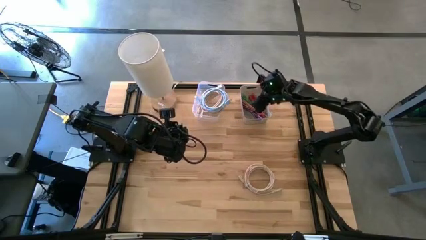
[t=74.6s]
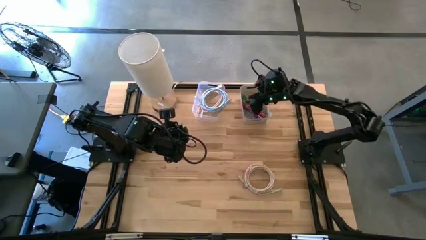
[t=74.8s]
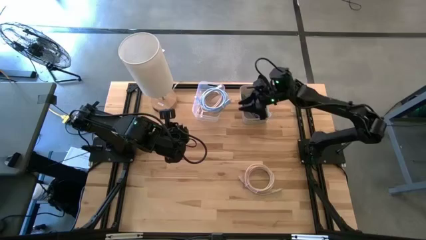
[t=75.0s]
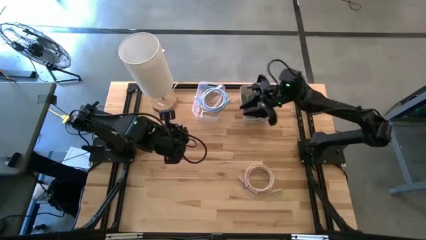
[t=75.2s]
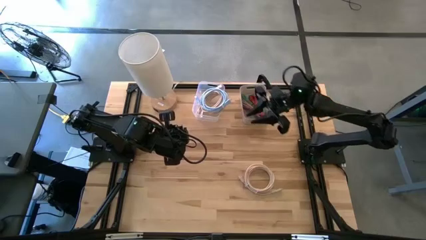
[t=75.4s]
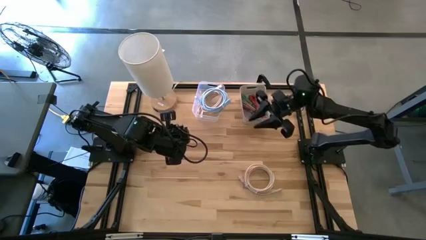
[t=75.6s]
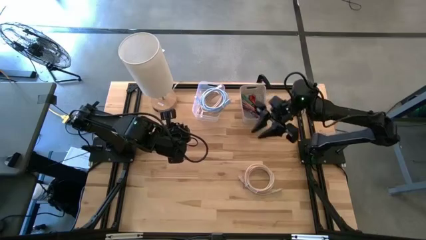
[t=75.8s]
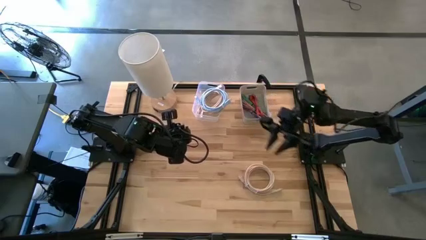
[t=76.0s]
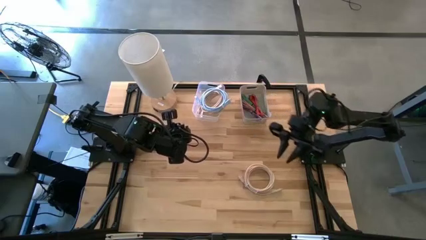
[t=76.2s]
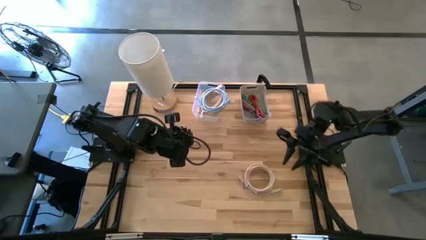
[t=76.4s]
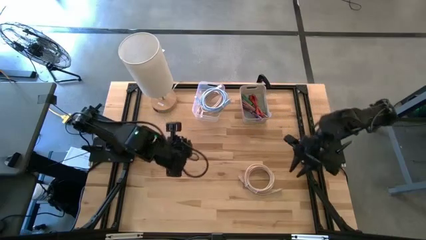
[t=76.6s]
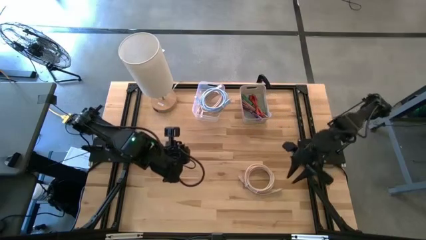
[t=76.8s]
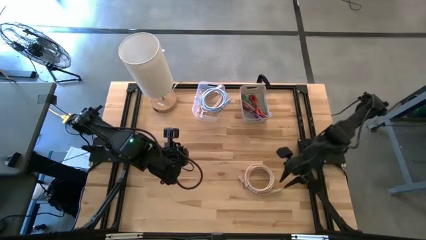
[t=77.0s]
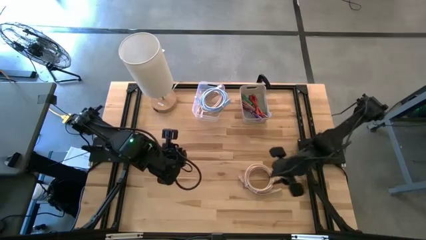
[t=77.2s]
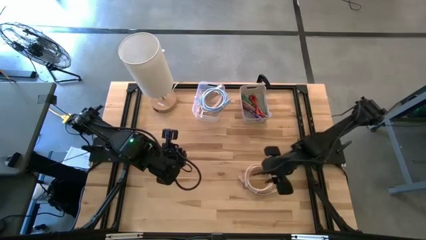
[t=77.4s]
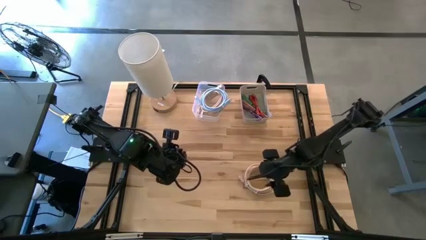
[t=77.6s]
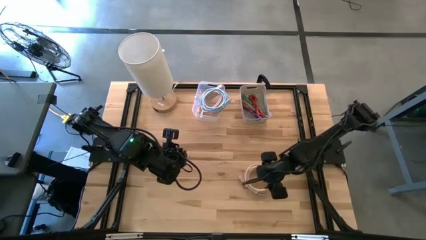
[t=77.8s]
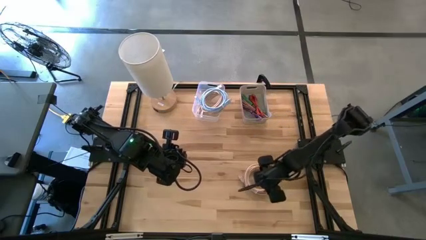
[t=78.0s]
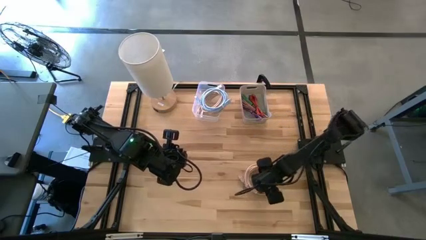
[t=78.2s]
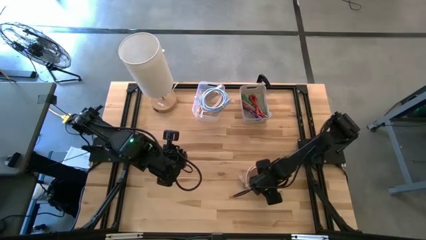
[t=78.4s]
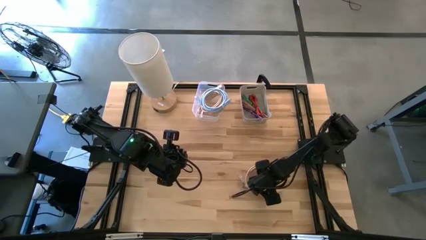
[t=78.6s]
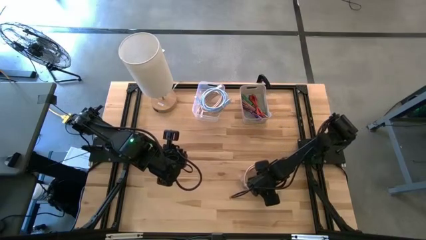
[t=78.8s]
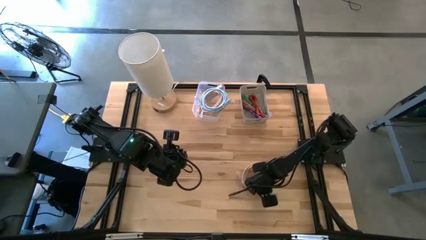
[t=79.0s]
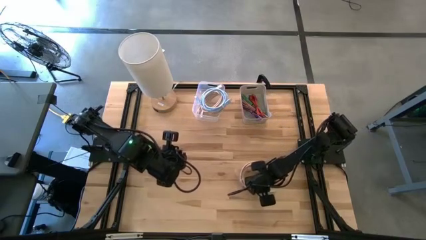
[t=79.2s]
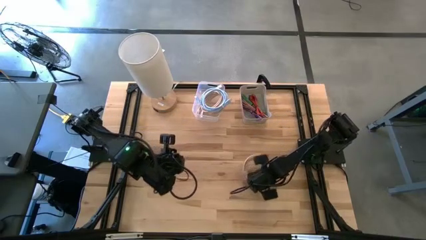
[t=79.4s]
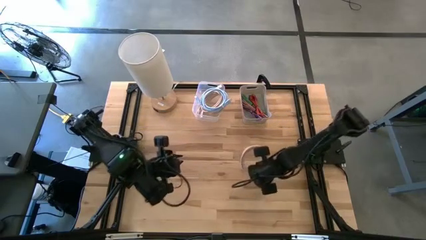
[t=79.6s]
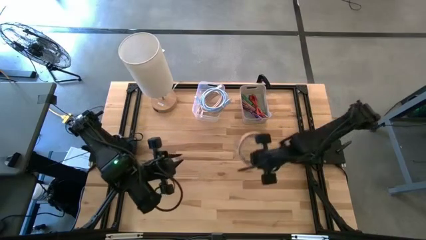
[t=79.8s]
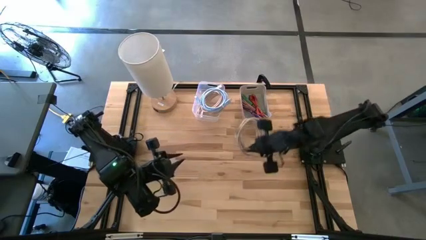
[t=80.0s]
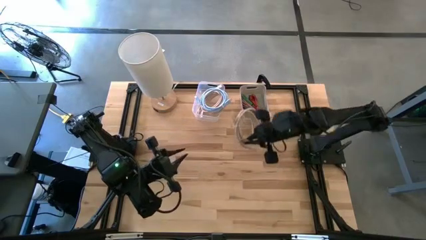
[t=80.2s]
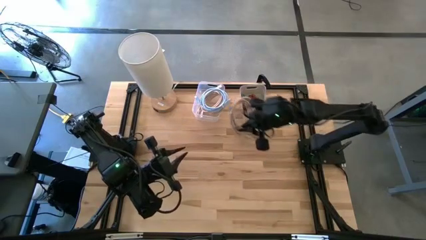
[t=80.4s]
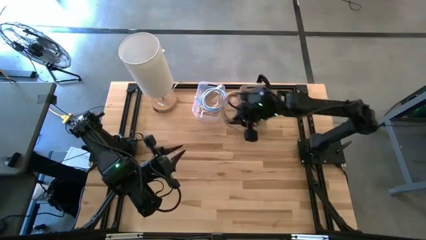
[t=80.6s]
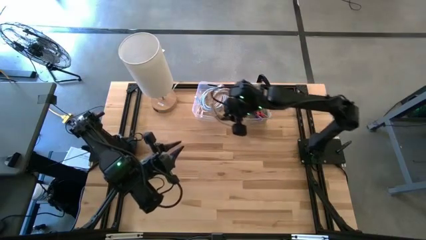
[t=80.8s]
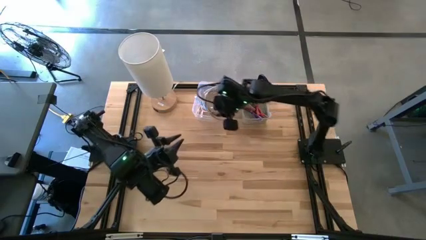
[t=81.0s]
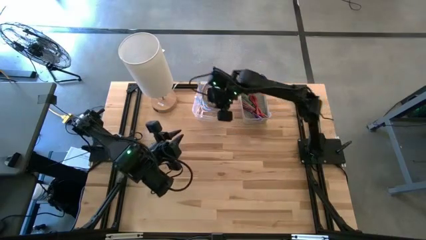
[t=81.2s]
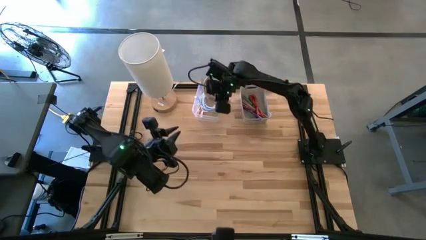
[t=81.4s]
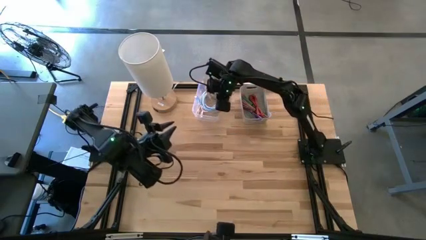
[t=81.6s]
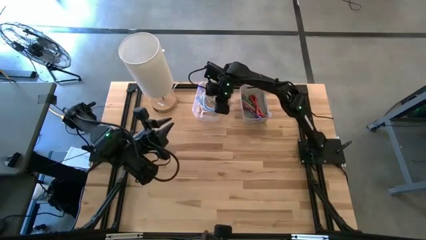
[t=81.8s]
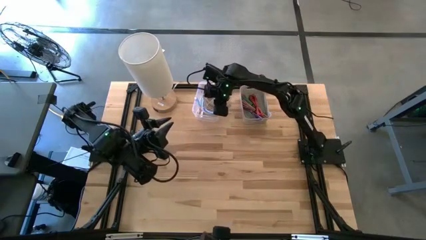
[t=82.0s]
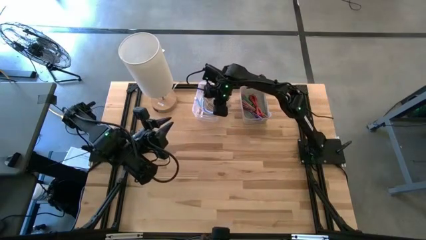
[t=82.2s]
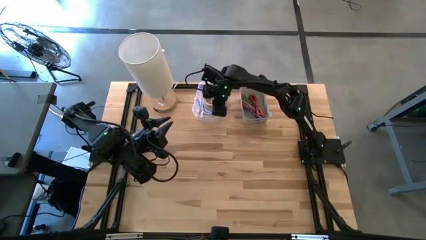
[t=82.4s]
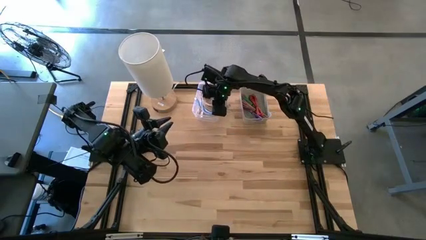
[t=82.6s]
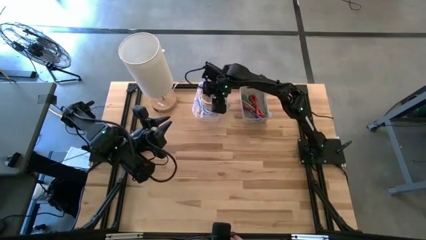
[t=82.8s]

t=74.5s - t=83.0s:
Task: Pick & Place USB Port
Put the light yellow hdmi cable into the transparent bin

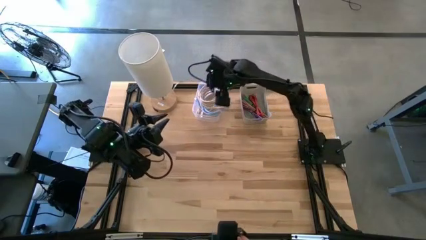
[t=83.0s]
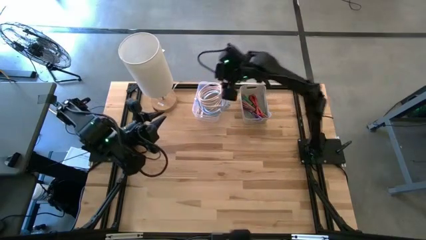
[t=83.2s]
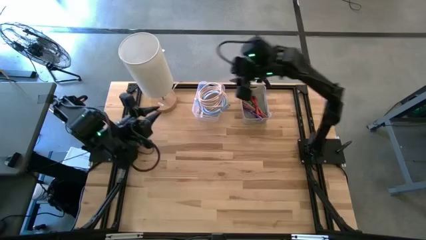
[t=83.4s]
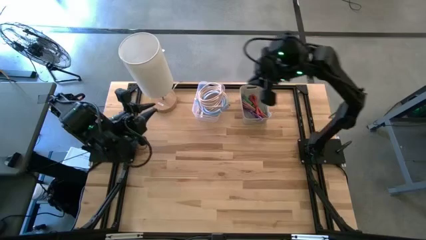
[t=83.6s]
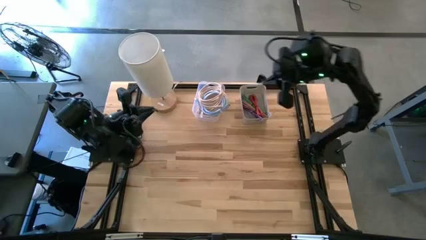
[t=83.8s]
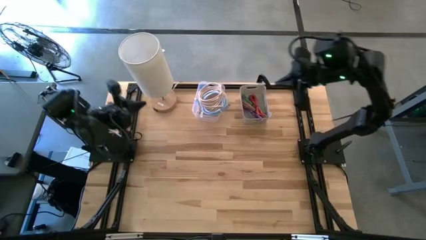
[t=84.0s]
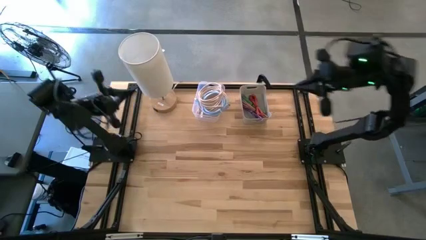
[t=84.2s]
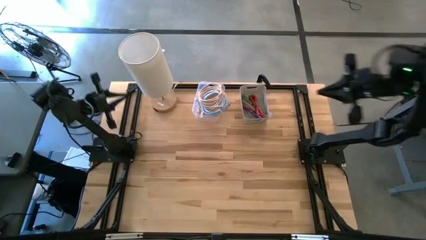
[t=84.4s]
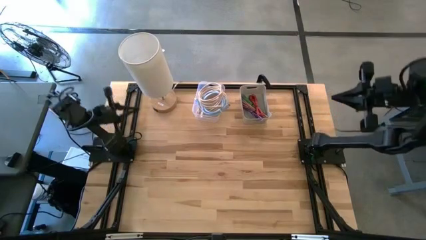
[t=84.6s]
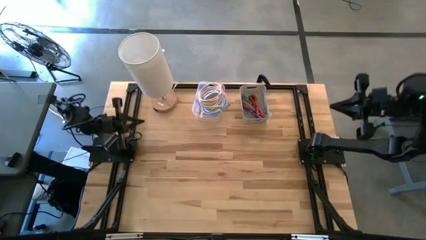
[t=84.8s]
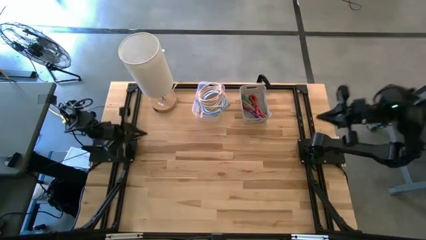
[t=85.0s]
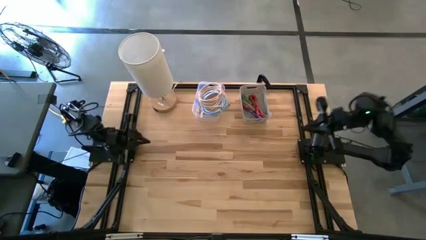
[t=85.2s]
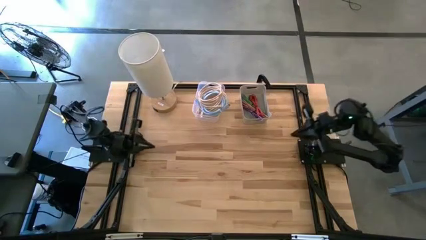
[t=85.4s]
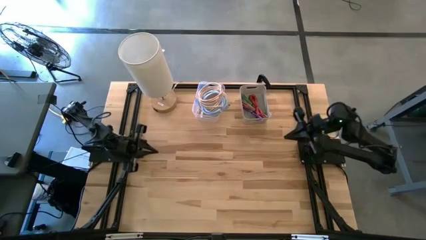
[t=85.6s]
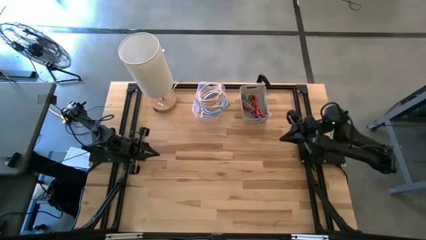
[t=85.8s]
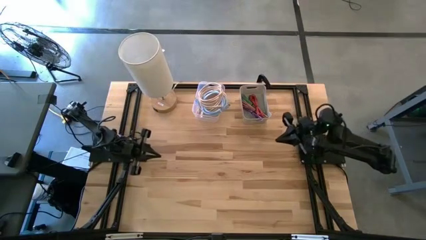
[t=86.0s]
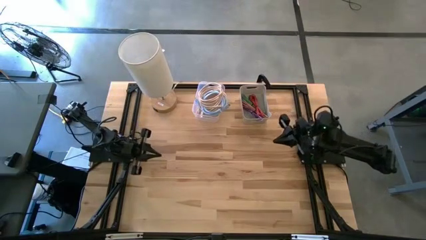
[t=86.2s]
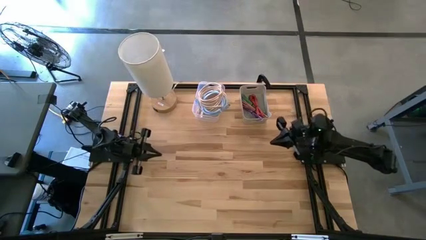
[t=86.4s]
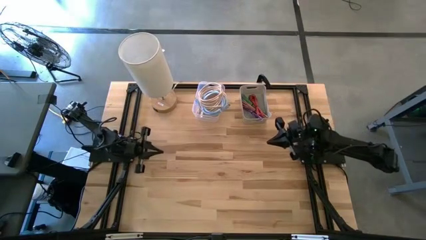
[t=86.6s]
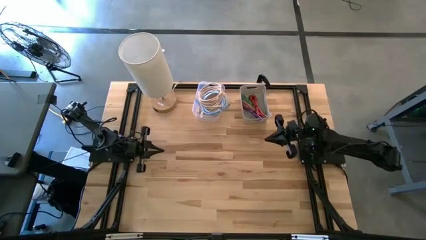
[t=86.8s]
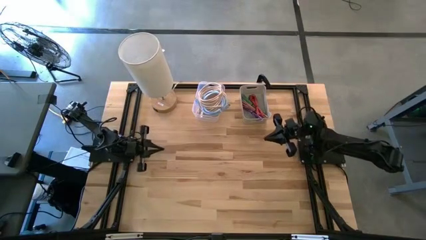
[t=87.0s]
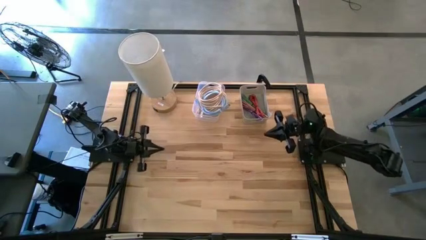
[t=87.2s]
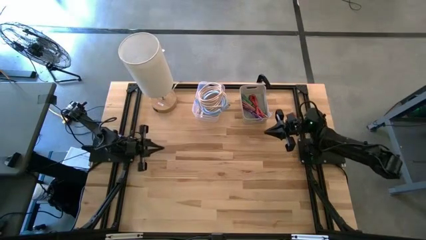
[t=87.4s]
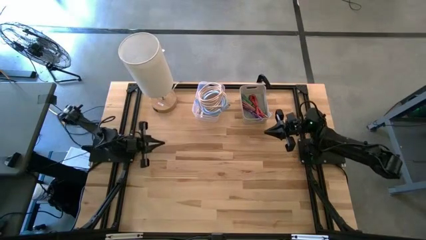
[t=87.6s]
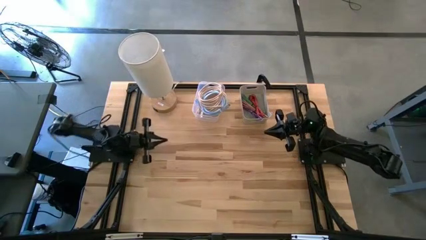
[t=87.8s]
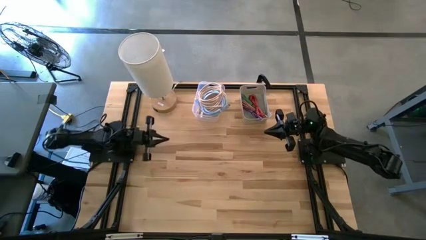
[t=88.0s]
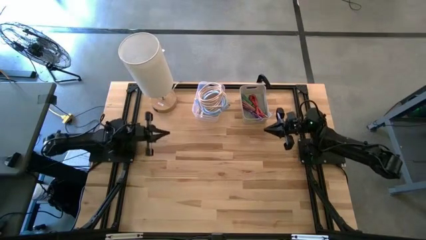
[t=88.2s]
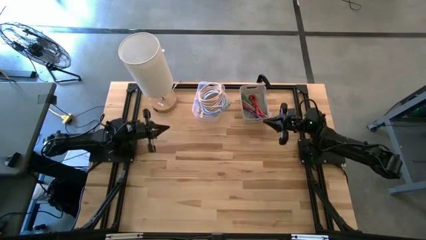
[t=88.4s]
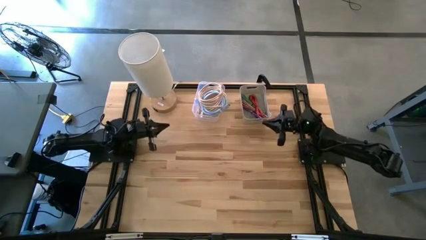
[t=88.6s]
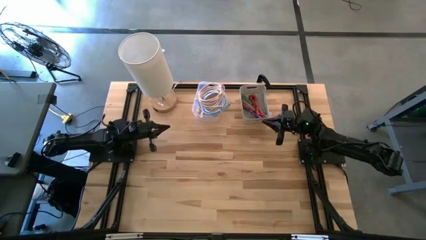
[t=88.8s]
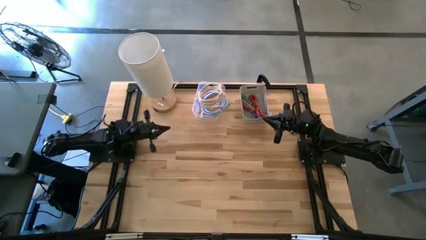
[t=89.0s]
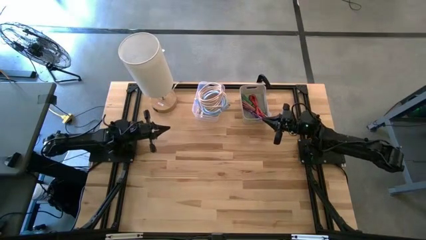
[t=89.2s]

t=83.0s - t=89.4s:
Return to Home Position

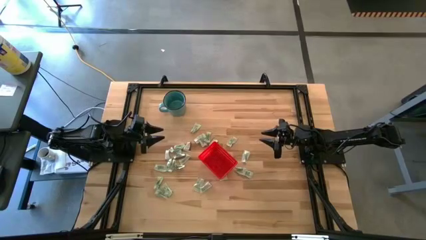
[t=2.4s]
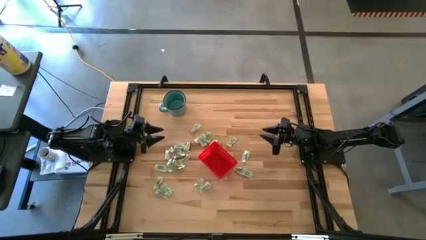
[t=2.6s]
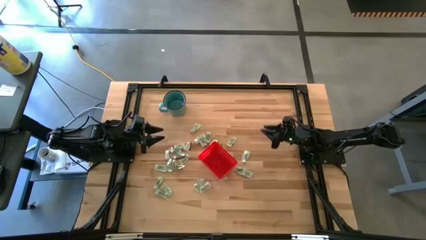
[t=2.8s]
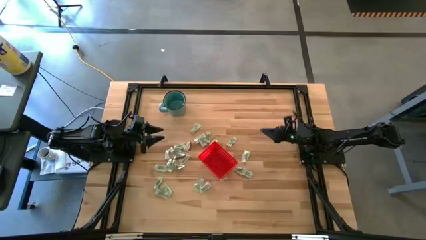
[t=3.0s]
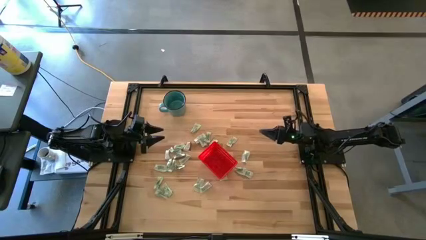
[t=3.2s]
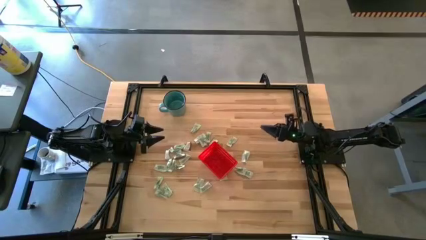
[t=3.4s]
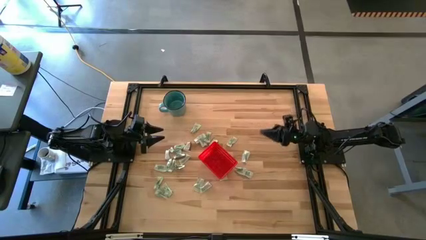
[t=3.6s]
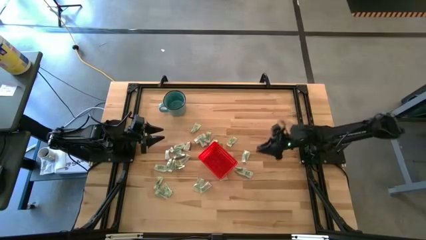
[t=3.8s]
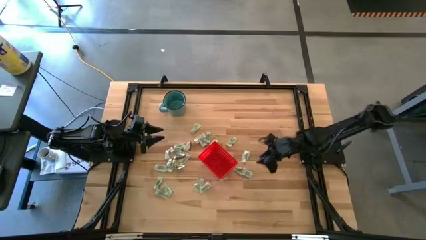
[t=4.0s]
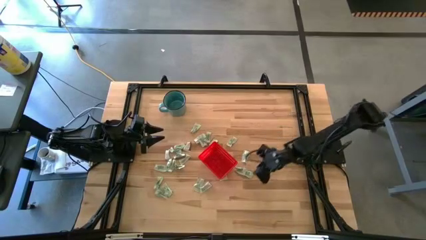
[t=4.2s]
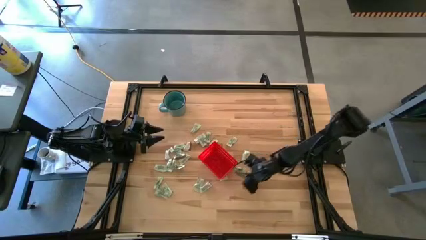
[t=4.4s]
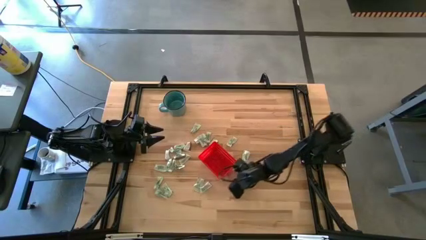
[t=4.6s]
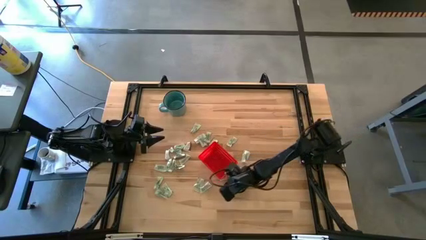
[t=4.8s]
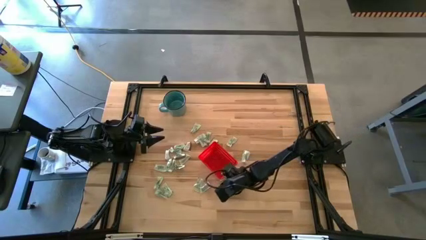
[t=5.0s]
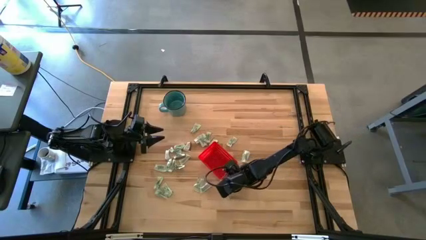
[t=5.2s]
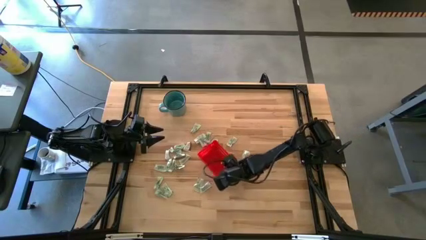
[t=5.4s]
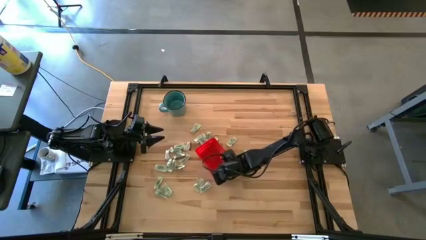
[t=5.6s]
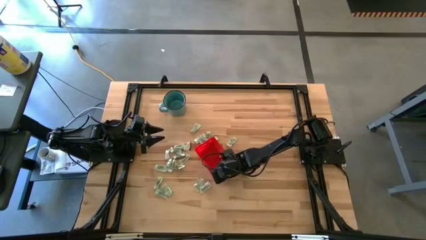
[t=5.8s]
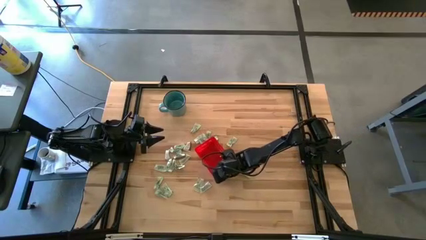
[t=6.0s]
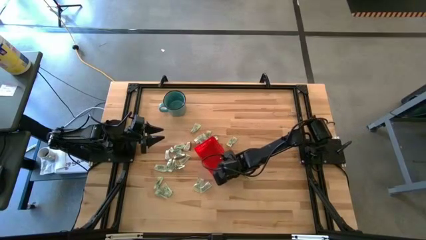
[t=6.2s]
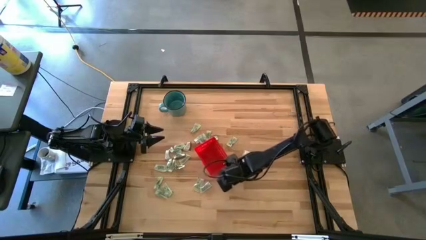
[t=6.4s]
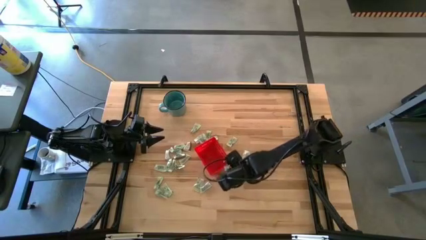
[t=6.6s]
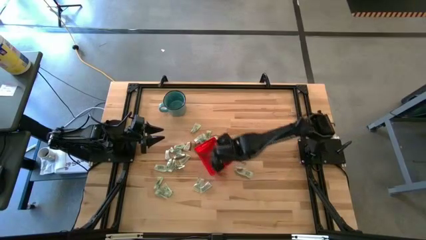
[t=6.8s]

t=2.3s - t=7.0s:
Task: Pick and place Stevia / Truvia into bins
Put the white stevia packet into the basket
